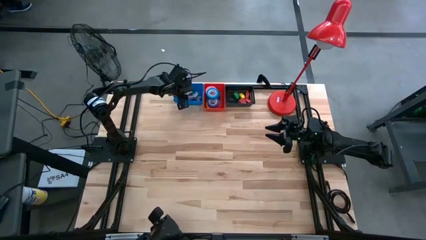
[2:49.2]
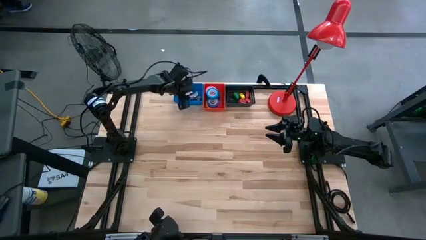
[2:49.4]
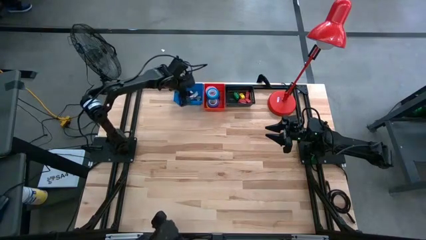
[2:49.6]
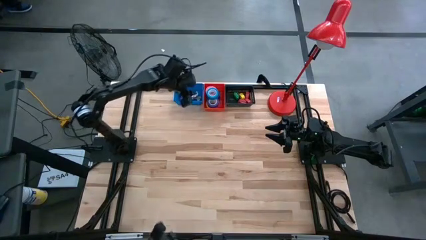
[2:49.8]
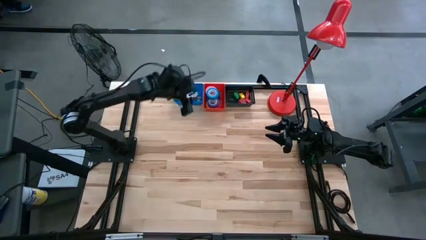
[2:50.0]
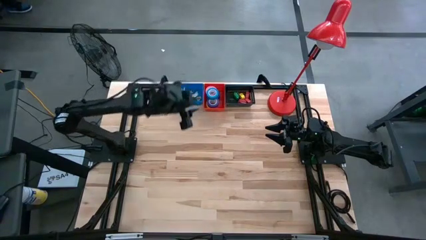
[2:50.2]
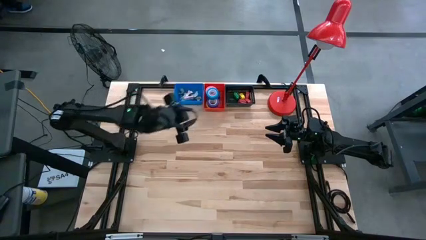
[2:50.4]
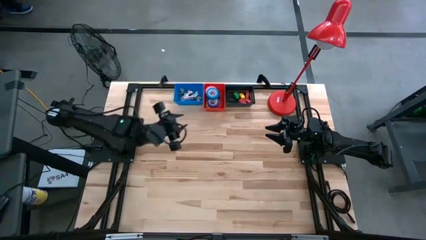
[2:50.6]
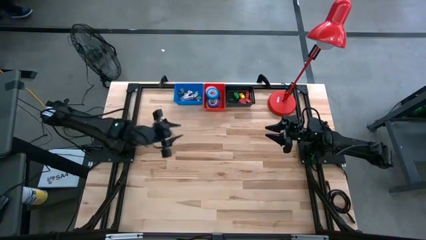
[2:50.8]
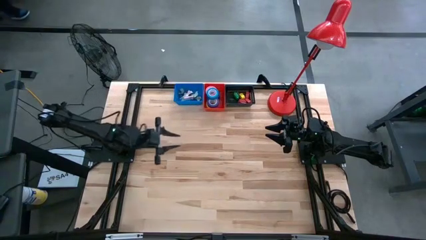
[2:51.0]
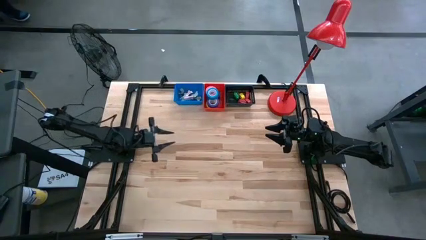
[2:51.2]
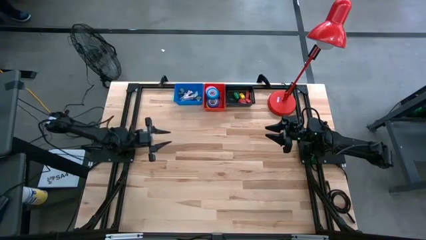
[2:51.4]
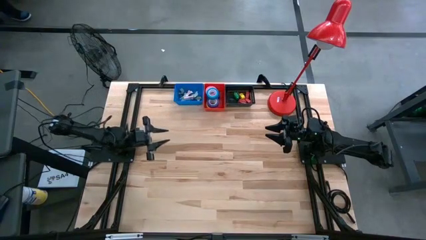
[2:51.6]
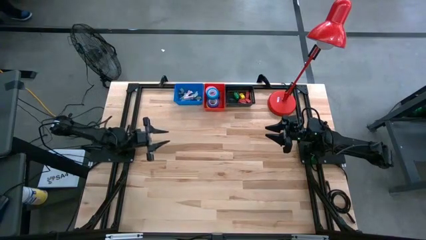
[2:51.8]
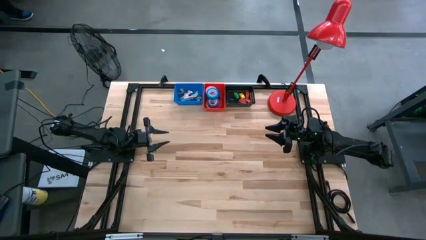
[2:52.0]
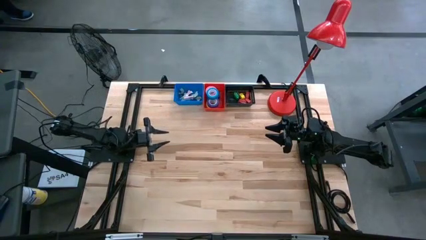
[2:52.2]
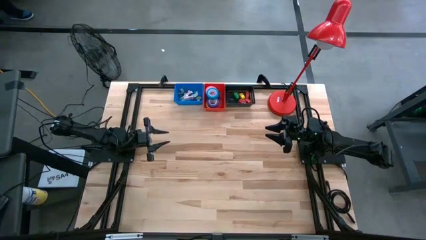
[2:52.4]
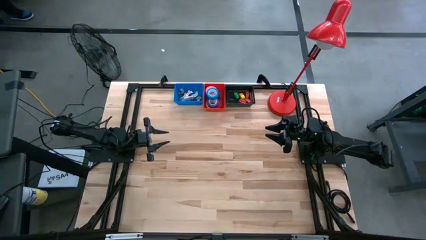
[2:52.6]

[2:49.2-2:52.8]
Task: Pick and place Stapler, Stapler remover, tape
Return to Home Position

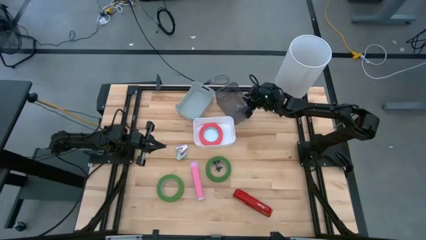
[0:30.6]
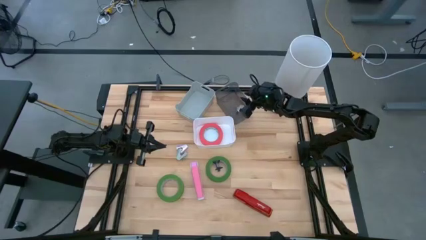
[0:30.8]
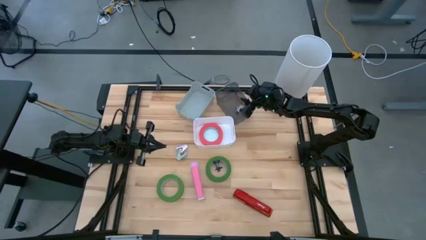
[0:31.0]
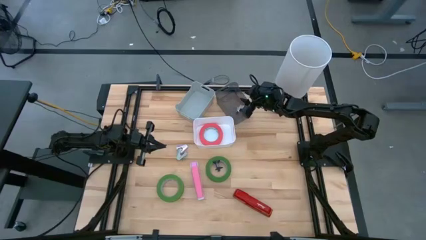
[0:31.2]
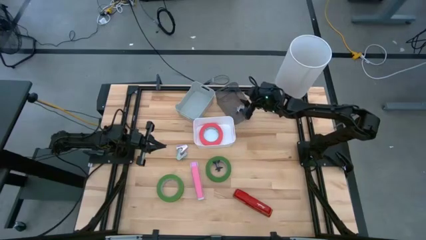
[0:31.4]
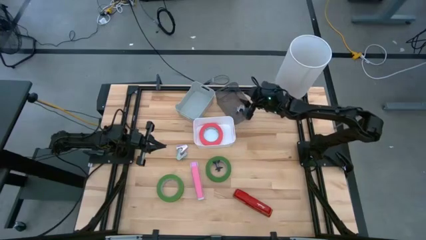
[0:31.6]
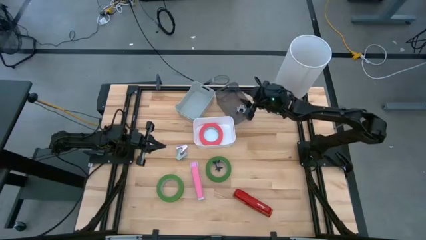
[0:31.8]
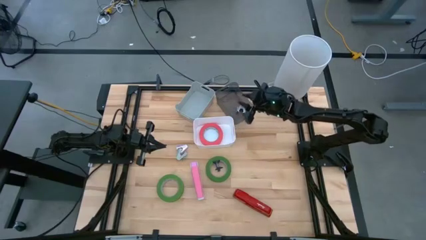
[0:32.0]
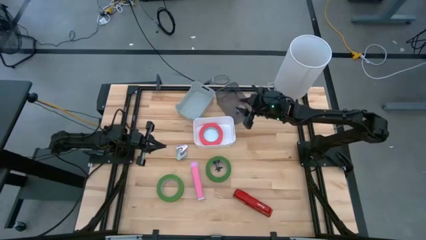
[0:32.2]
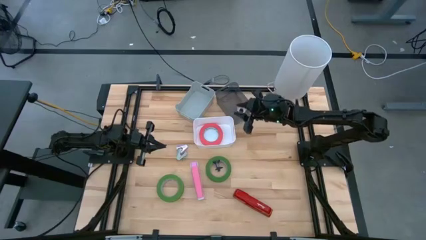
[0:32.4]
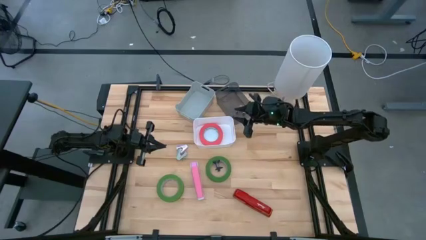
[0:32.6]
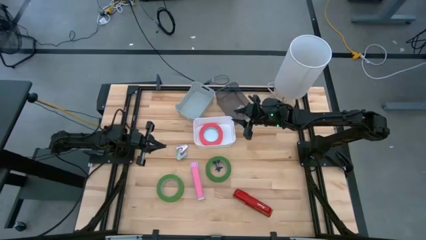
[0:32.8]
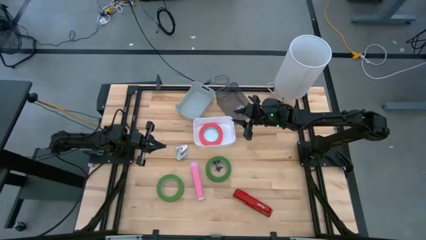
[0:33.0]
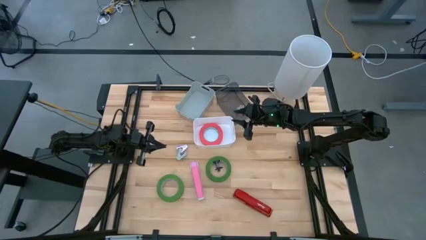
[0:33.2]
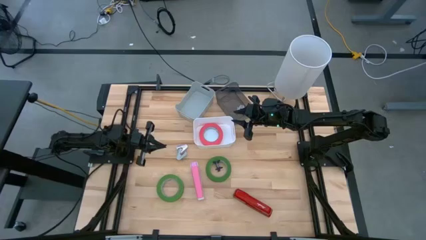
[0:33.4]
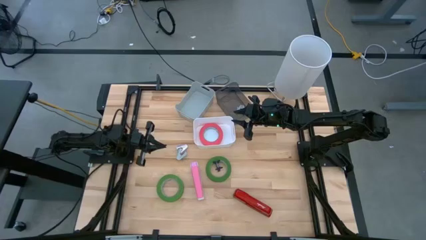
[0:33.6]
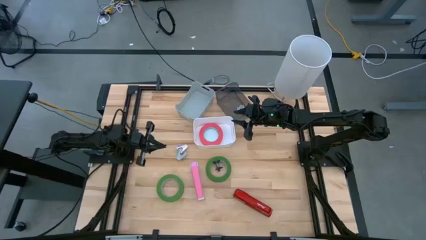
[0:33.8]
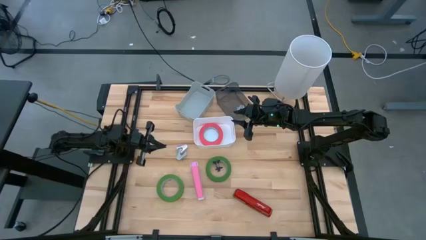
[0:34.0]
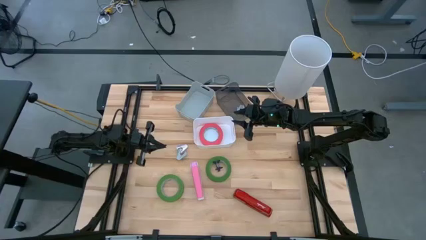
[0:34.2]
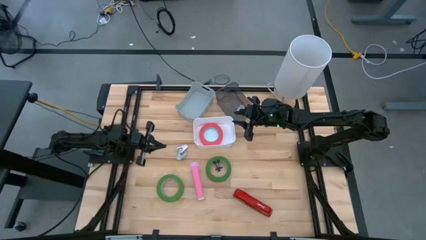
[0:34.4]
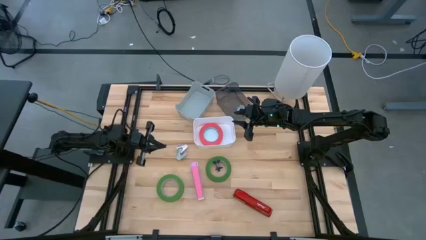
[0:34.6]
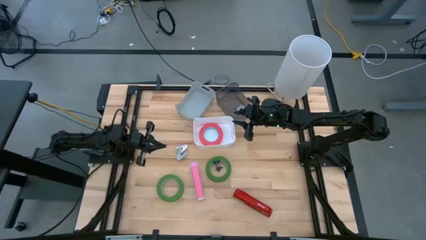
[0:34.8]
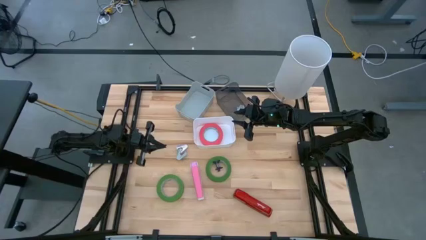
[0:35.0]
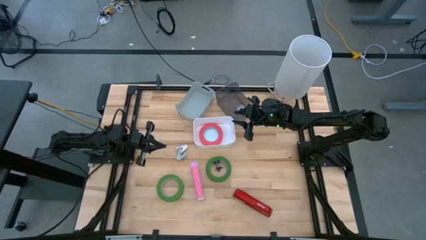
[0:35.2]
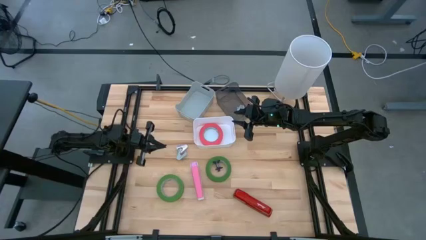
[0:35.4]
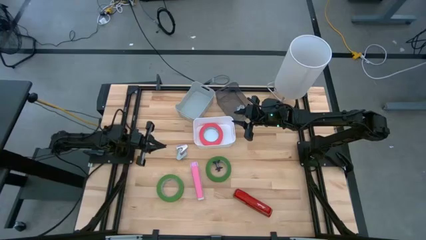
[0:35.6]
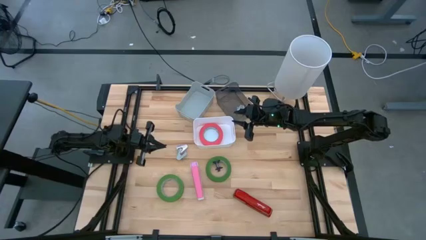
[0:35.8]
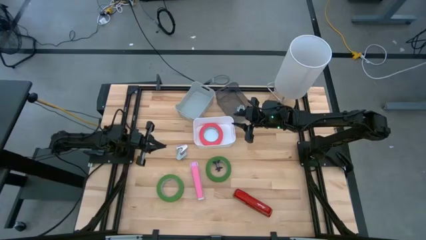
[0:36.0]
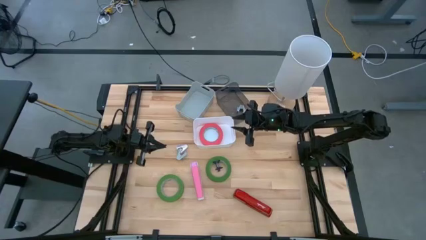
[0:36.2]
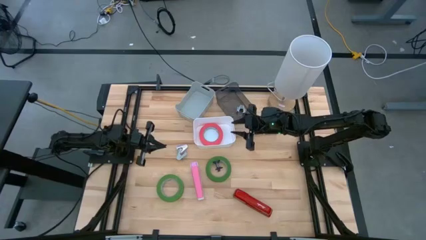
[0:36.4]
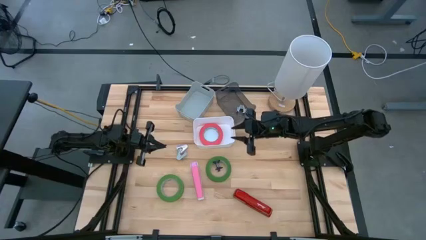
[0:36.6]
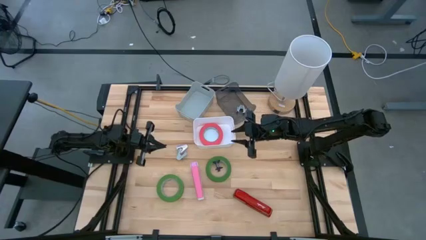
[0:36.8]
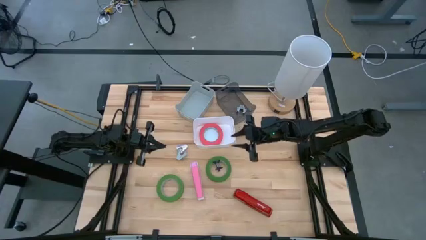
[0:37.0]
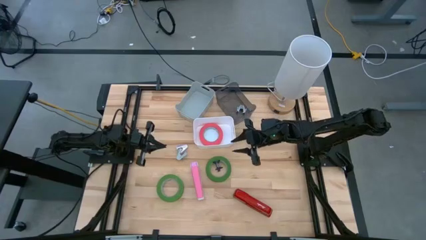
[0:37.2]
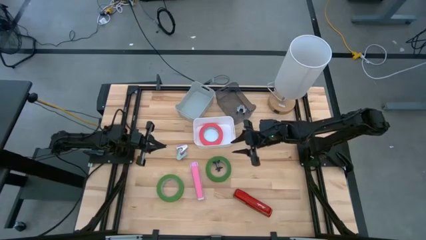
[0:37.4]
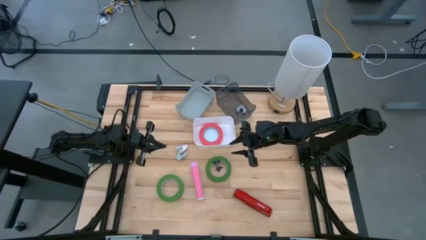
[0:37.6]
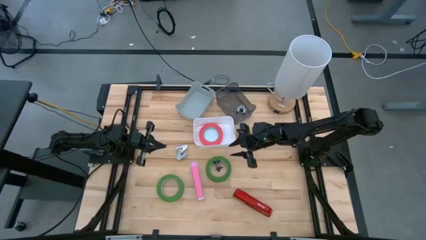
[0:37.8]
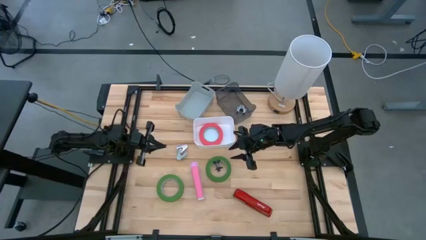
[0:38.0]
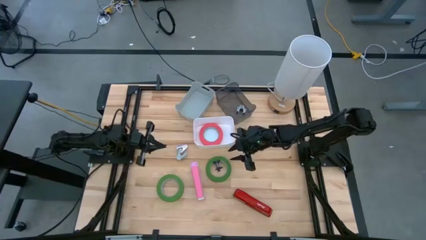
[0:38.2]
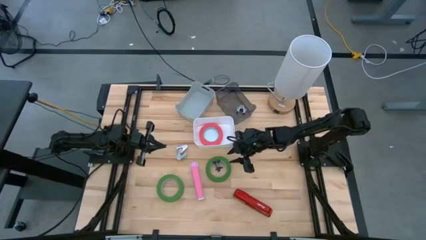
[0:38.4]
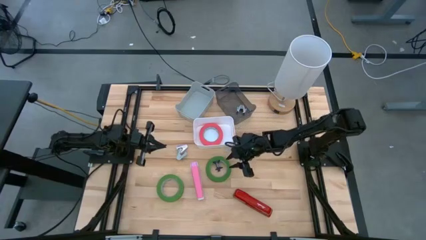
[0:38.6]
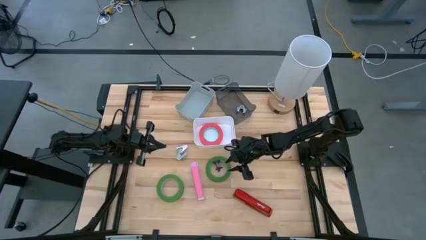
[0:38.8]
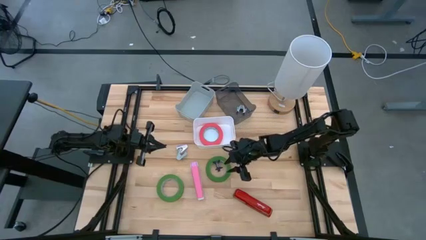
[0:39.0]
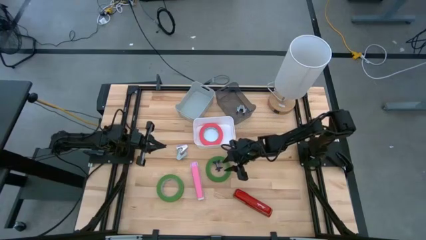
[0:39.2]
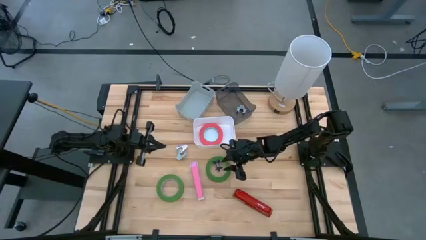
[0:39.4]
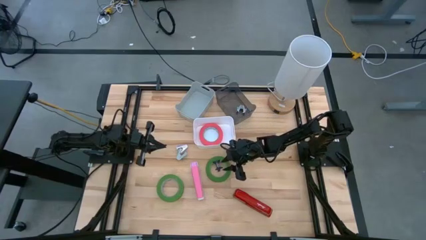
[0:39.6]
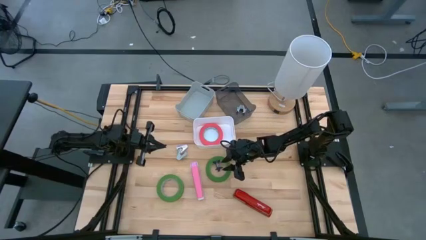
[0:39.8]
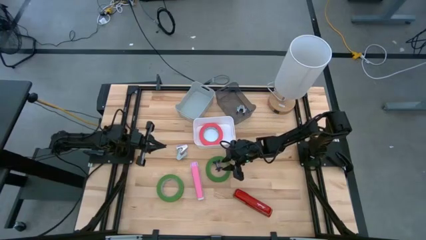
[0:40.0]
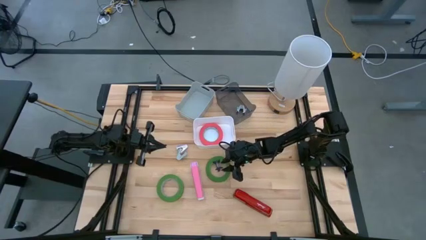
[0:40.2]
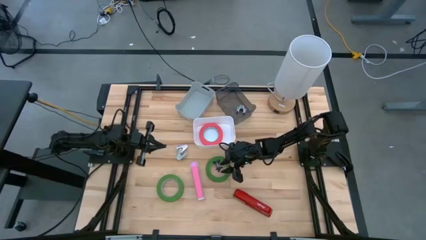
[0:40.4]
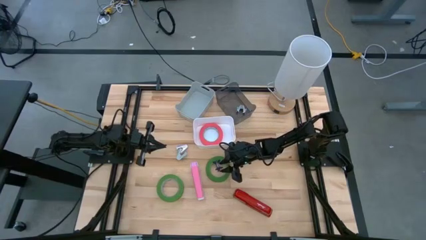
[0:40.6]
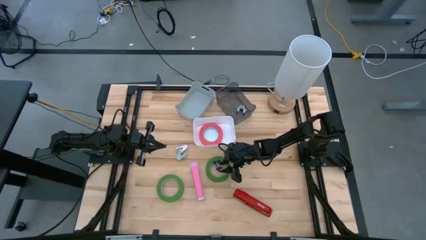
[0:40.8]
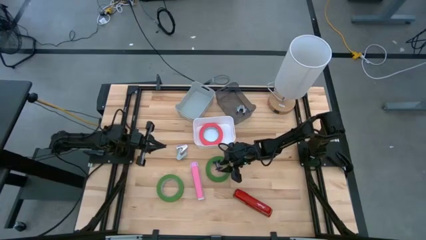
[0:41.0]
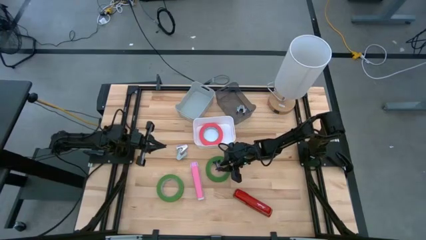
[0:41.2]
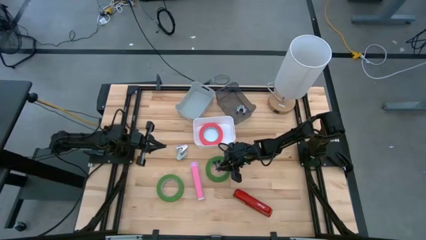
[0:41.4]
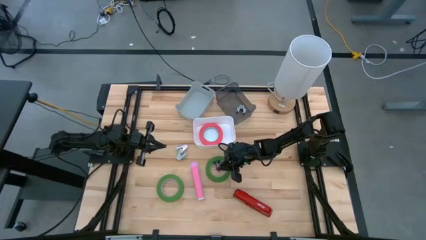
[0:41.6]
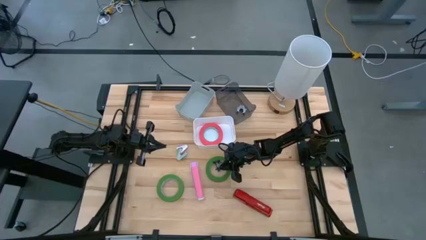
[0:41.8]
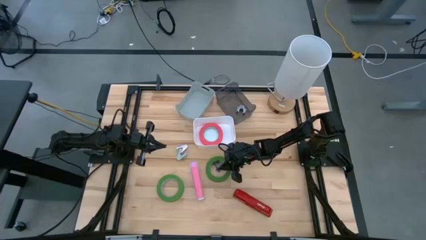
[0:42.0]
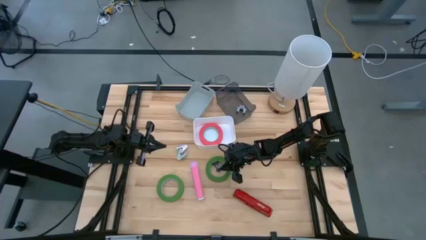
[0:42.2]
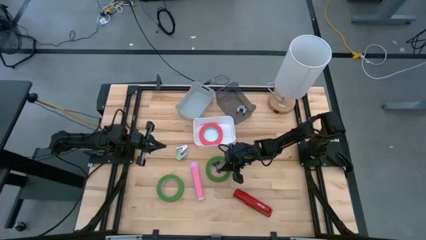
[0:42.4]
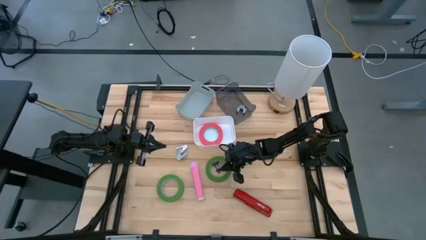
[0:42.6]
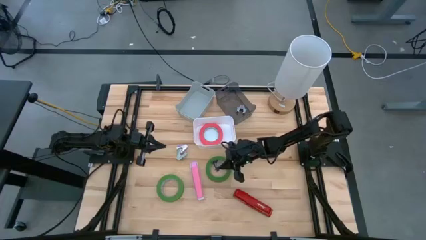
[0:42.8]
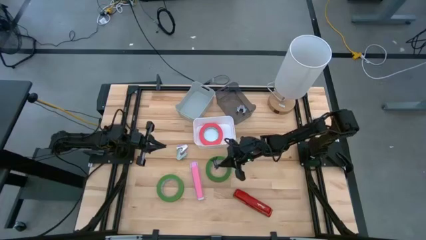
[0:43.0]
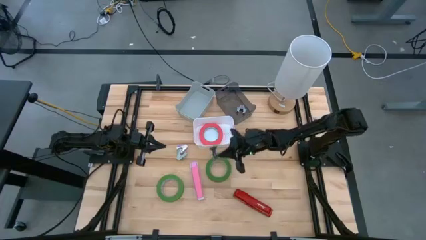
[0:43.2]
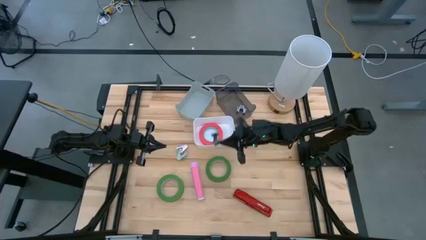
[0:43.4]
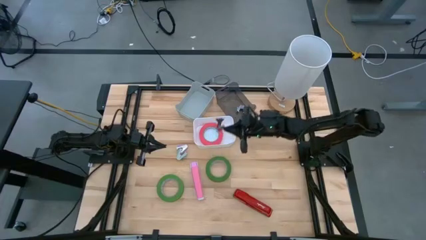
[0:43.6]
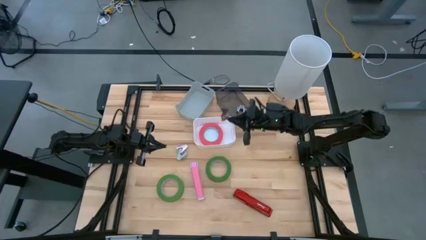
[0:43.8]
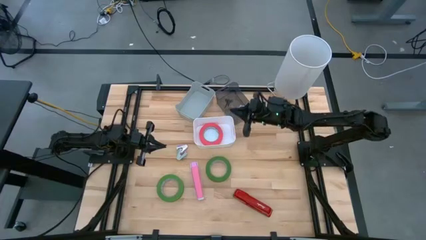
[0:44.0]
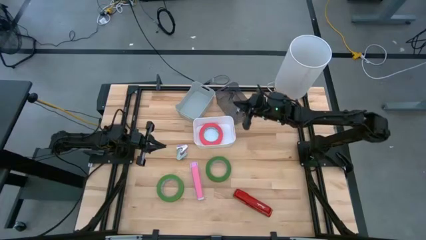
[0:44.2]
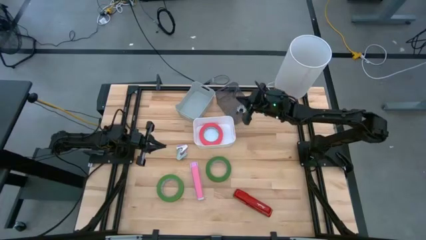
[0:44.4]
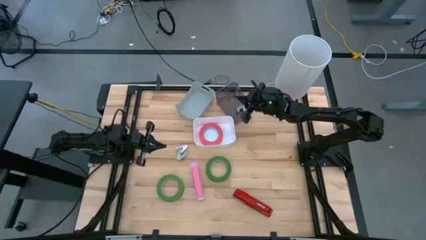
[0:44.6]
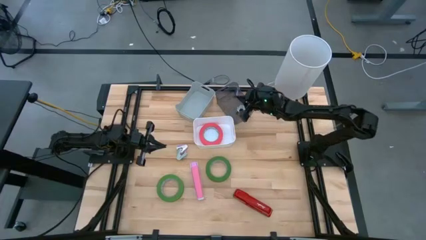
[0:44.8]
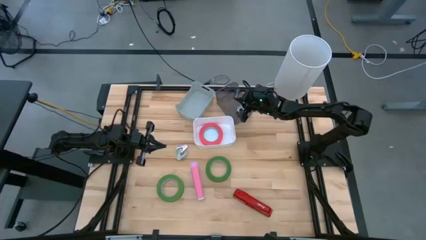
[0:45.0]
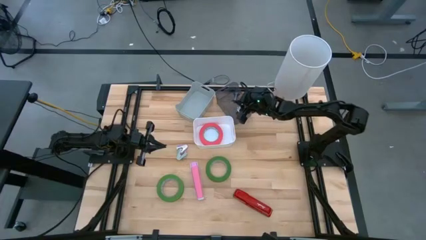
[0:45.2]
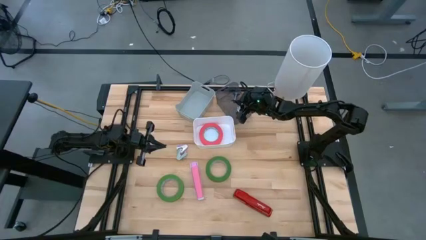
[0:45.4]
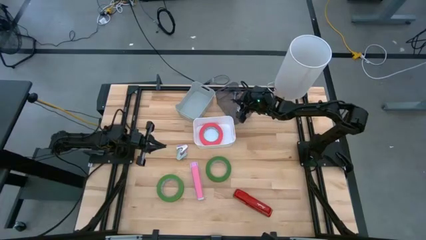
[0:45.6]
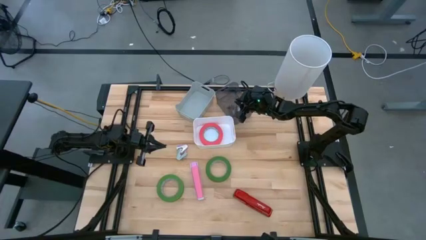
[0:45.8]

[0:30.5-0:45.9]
Task: Pick and place Stapler, Stapler remover, tape
Put the black staple remover into the black bin
